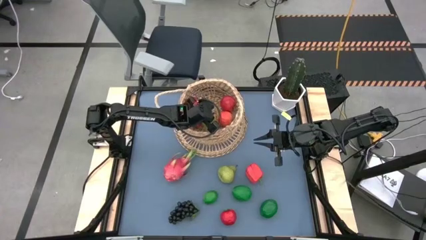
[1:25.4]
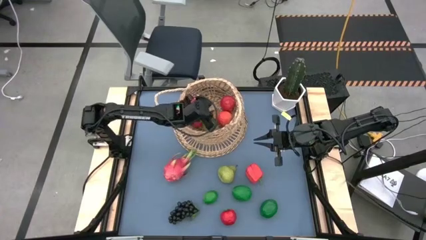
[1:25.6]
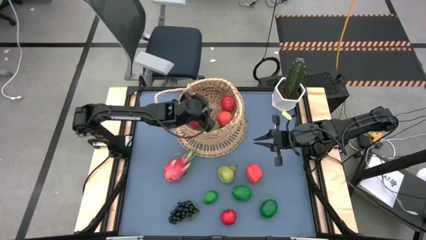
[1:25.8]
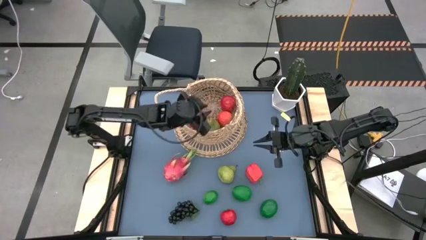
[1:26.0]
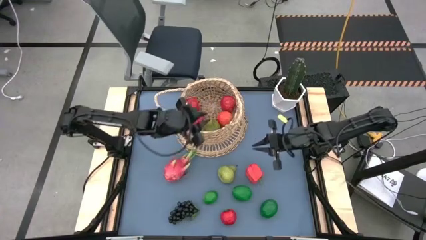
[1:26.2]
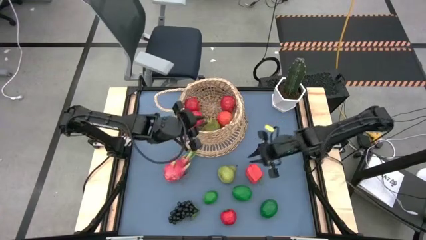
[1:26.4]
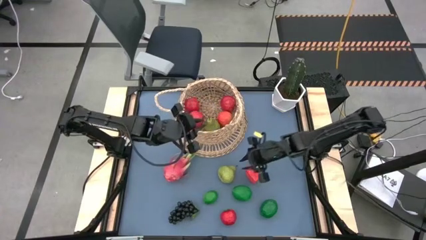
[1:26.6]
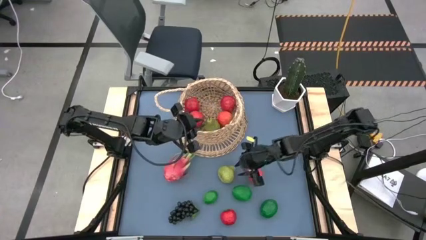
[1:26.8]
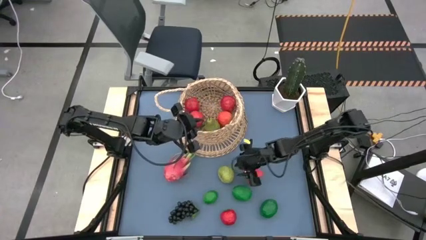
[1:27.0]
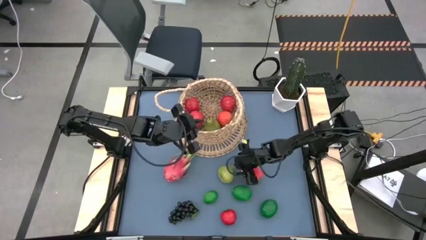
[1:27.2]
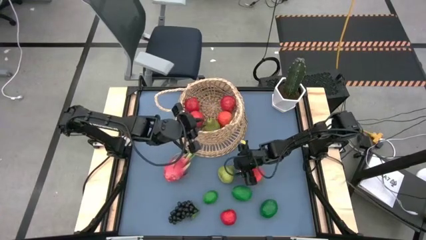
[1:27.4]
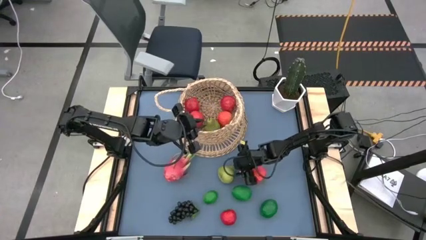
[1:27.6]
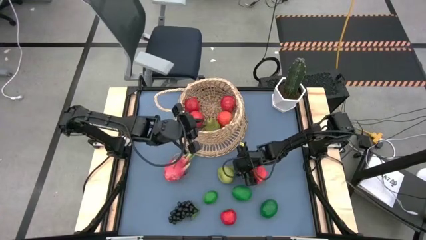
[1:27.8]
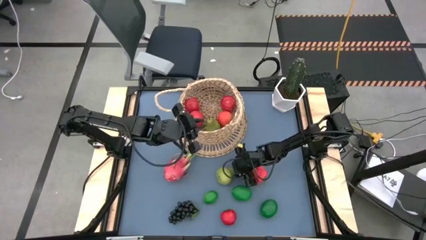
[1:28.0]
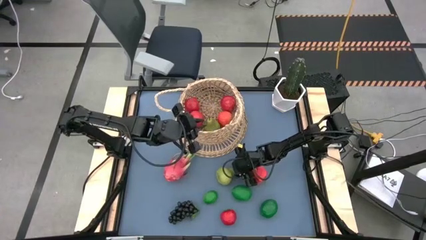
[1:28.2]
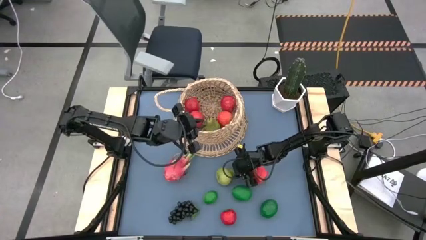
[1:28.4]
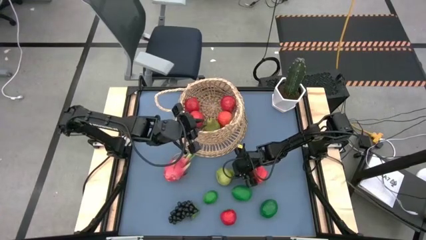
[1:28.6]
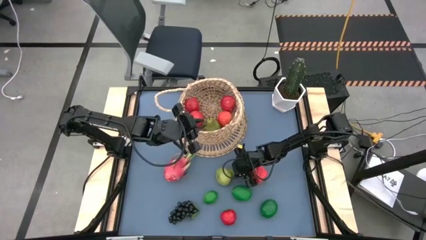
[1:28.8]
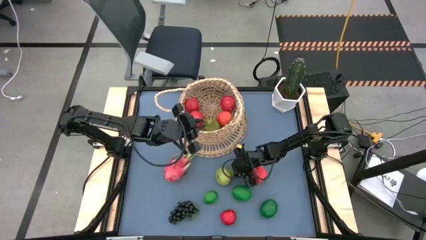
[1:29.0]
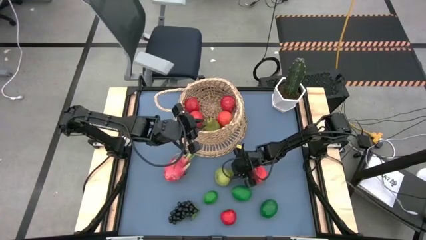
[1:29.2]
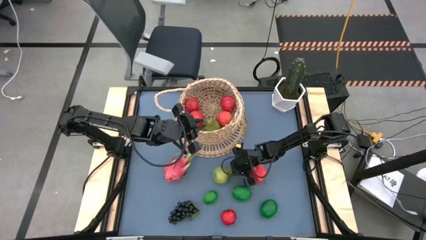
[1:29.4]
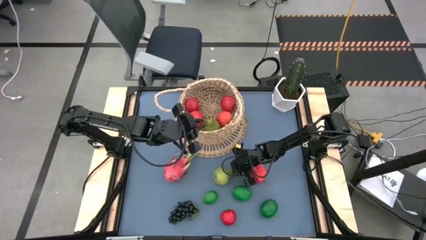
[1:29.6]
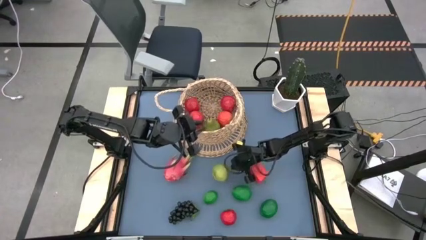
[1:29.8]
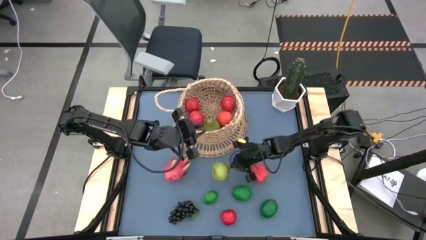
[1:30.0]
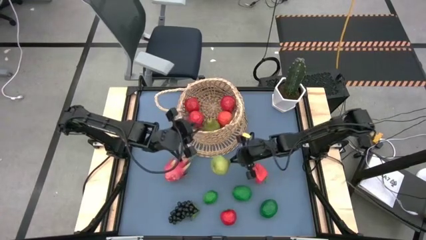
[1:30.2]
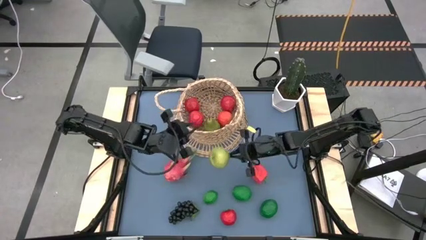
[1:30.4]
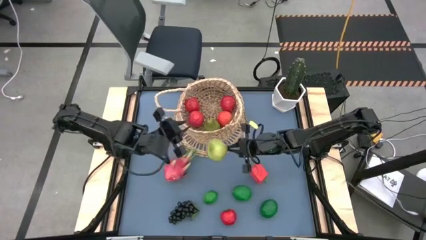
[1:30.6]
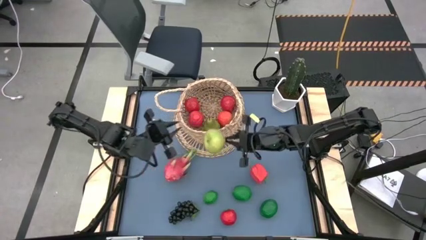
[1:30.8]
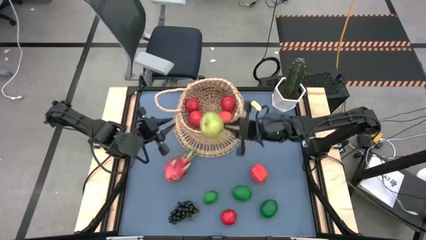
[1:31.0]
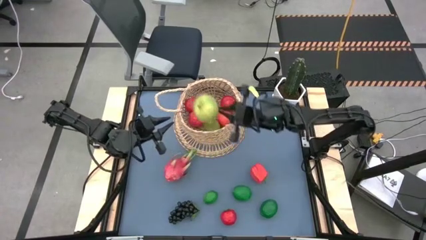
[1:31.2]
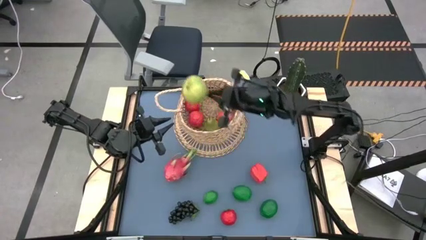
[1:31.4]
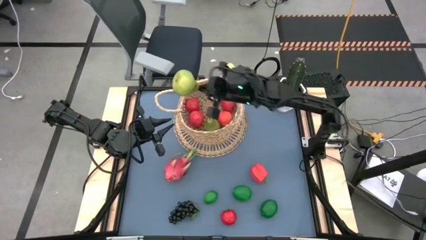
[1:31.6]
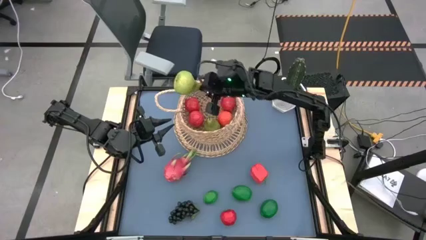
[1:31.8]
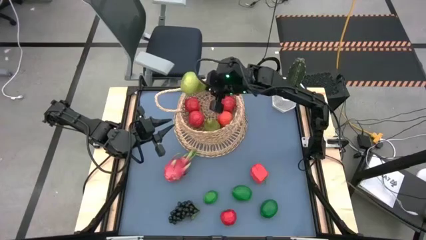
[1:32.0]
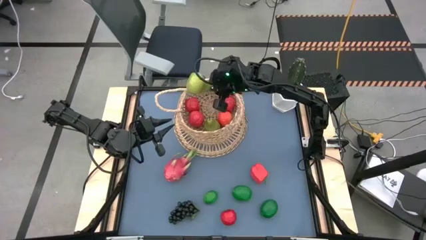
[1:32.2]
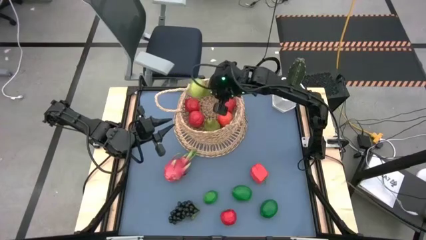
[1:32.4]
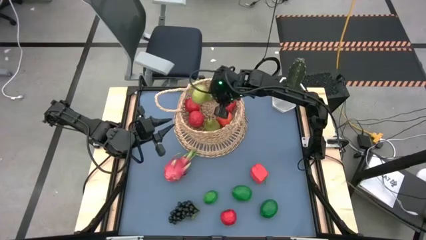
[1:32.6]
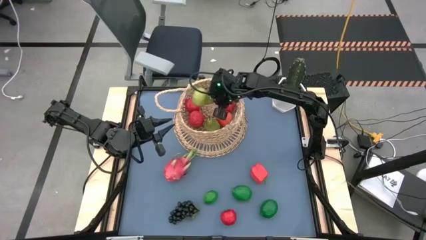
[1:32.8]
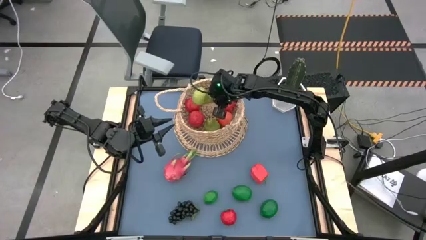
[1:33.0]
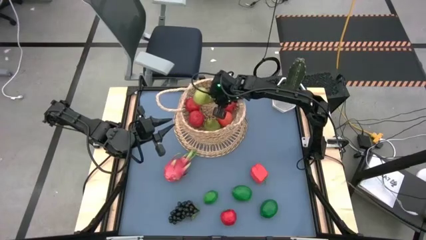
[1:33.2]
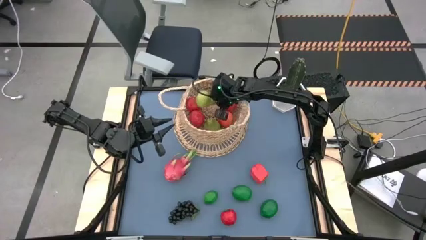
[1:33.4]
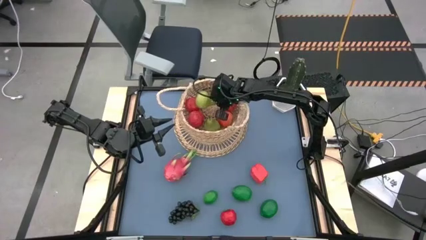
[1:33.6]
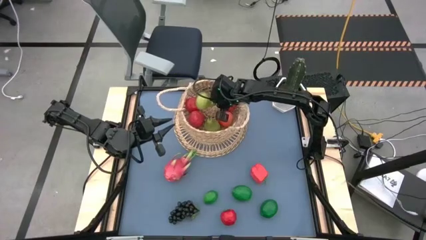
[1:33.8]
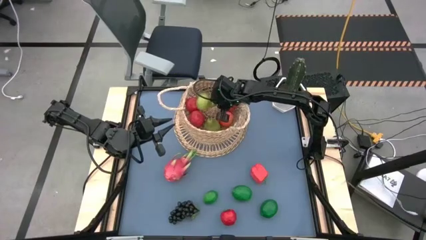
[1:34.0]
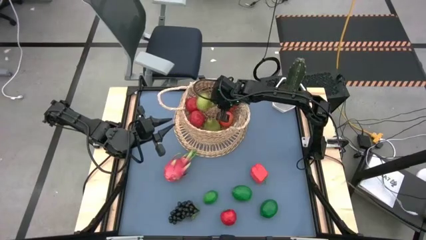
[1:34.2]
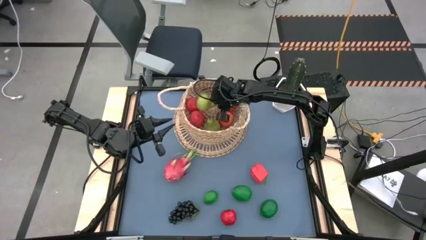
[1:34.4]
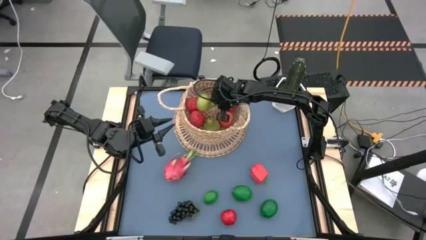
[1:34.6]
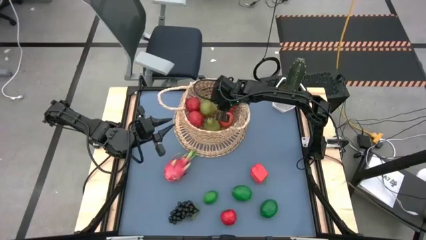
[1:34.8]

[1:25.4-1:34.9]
Task: Build produce basket
Put the pear into the basket

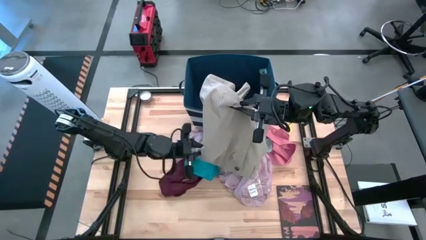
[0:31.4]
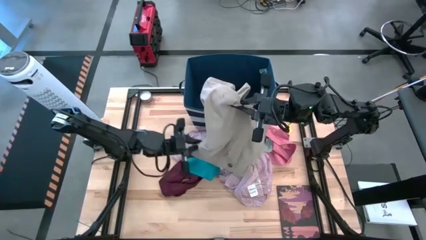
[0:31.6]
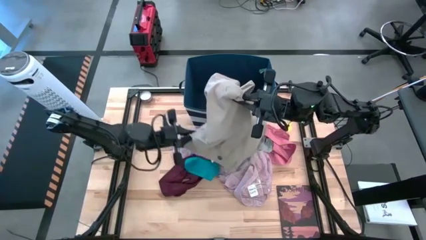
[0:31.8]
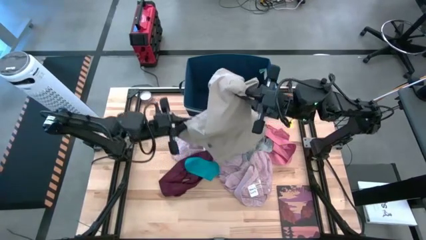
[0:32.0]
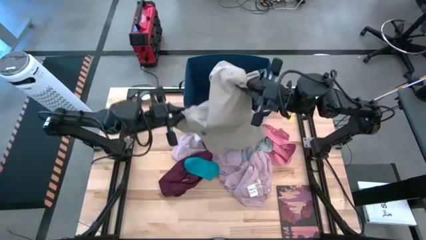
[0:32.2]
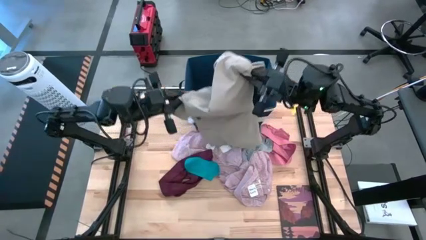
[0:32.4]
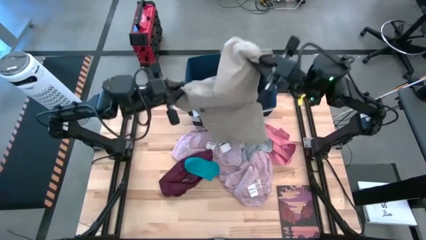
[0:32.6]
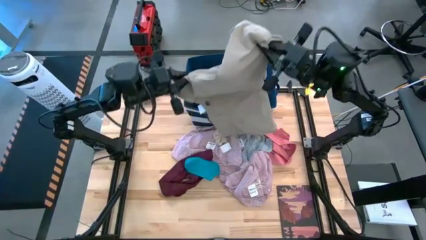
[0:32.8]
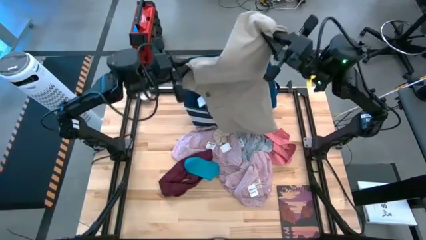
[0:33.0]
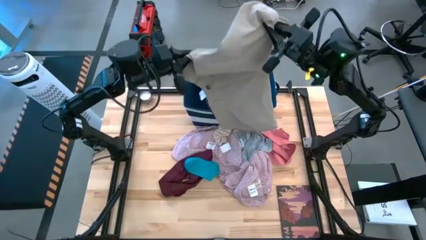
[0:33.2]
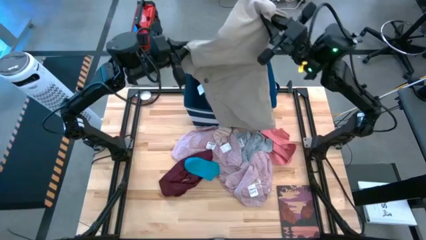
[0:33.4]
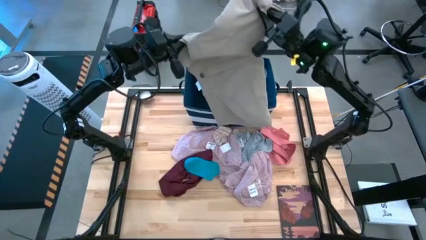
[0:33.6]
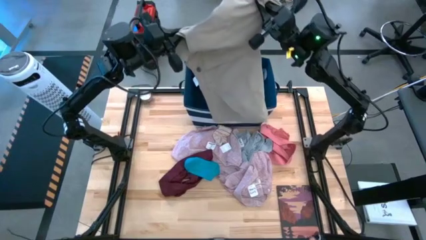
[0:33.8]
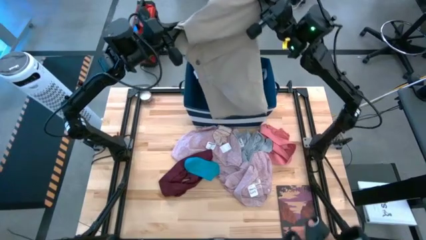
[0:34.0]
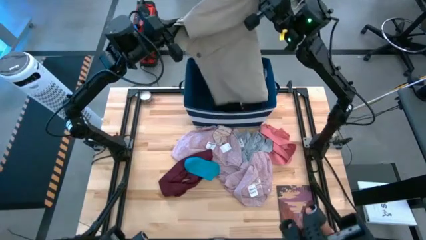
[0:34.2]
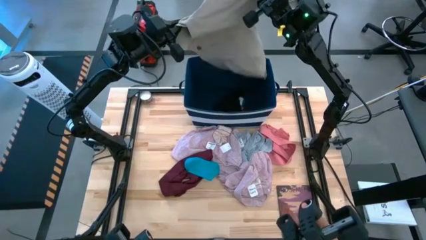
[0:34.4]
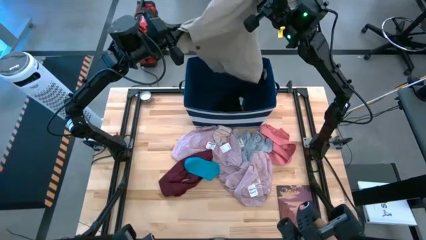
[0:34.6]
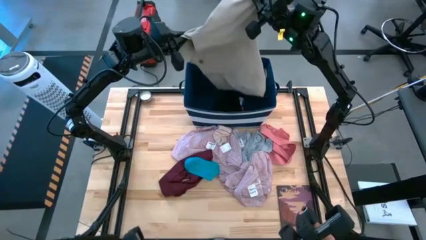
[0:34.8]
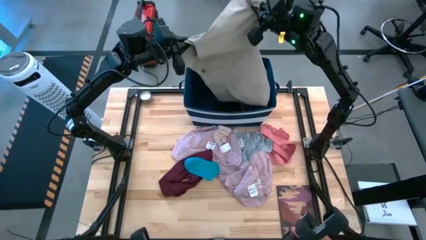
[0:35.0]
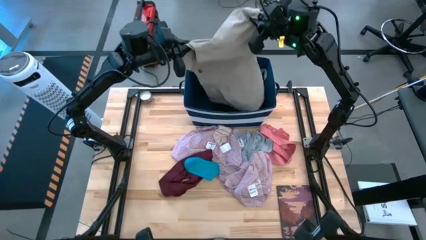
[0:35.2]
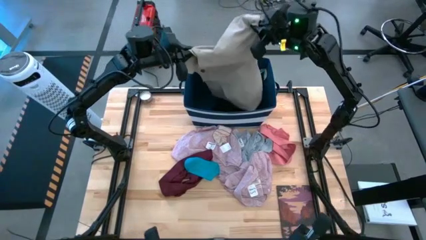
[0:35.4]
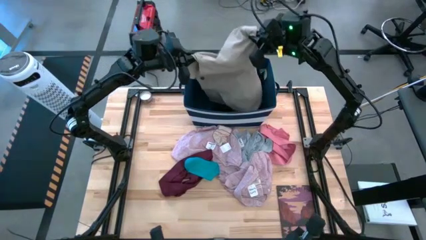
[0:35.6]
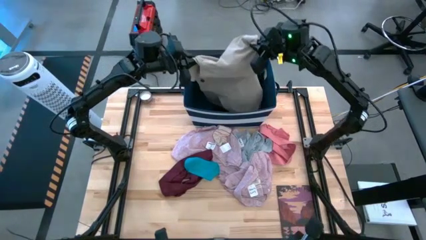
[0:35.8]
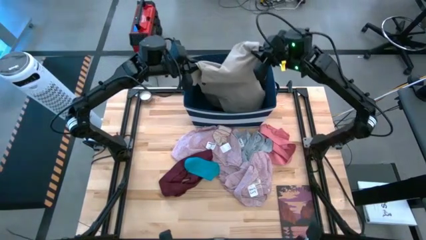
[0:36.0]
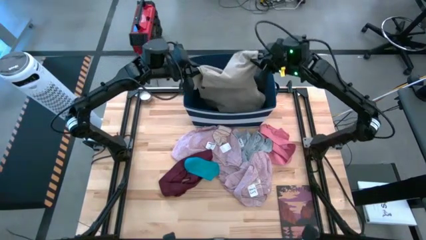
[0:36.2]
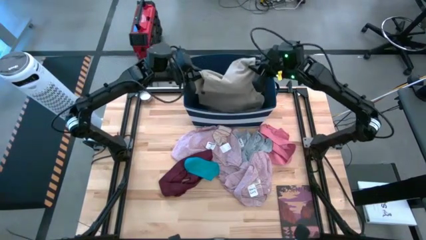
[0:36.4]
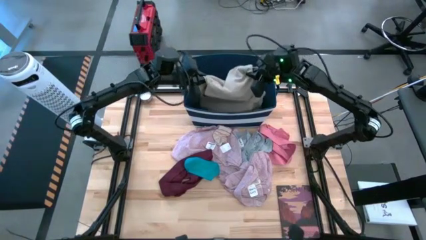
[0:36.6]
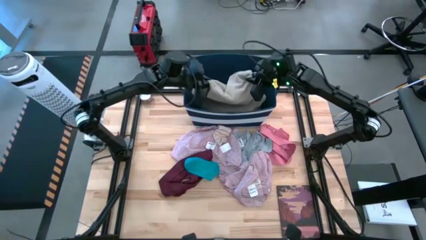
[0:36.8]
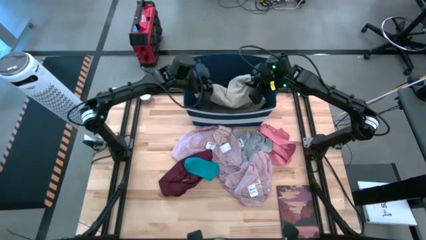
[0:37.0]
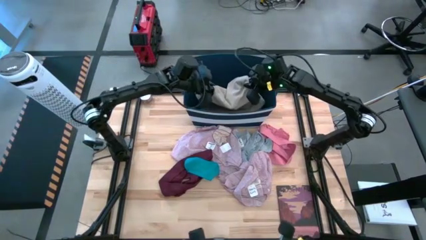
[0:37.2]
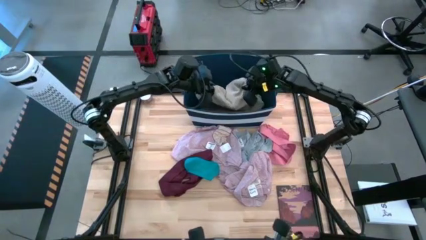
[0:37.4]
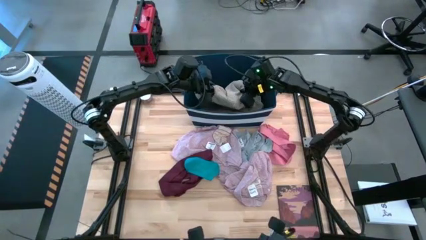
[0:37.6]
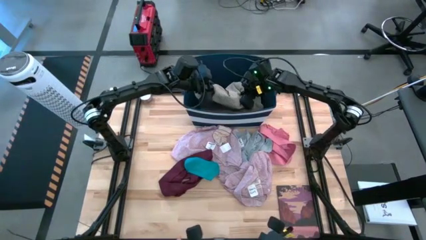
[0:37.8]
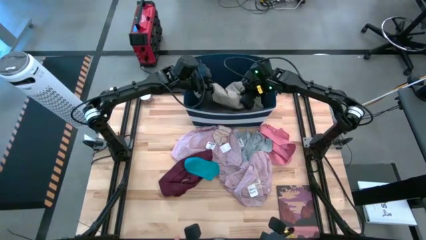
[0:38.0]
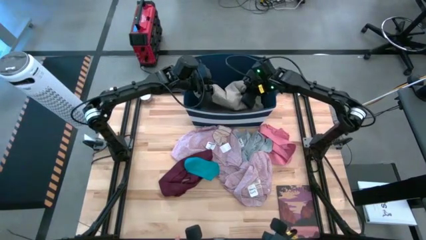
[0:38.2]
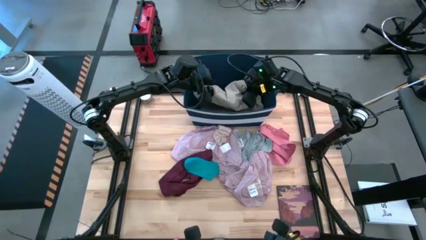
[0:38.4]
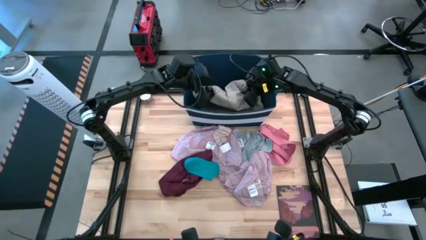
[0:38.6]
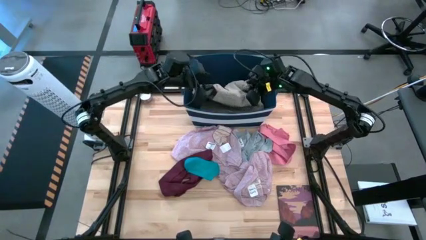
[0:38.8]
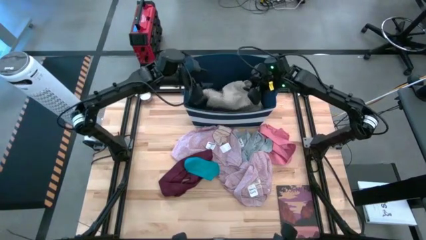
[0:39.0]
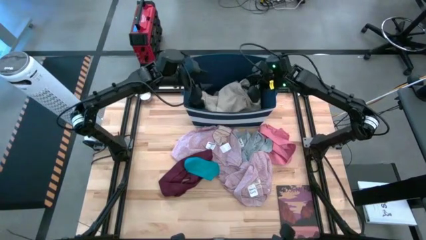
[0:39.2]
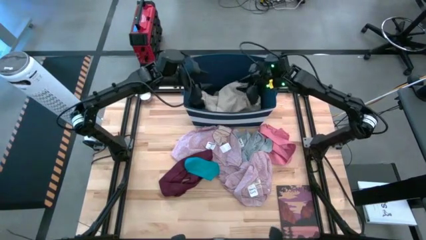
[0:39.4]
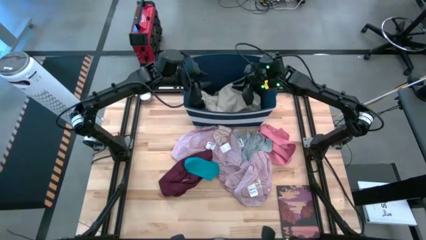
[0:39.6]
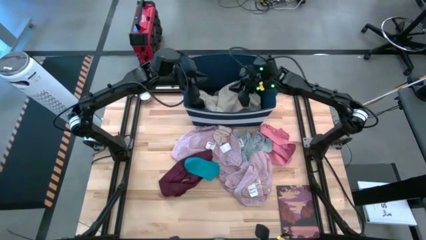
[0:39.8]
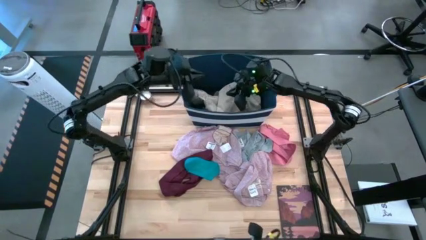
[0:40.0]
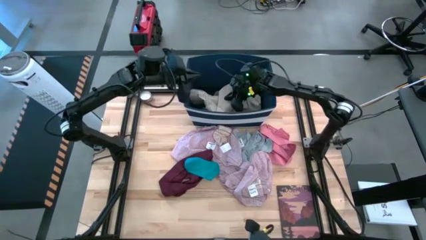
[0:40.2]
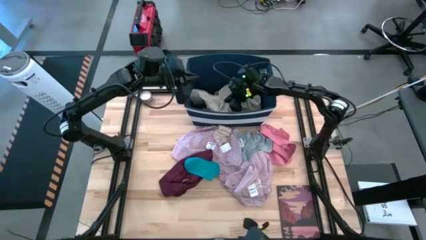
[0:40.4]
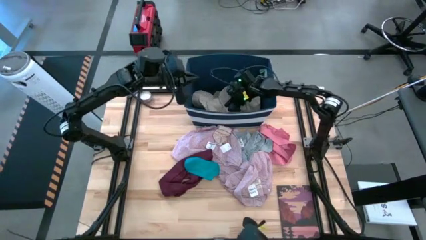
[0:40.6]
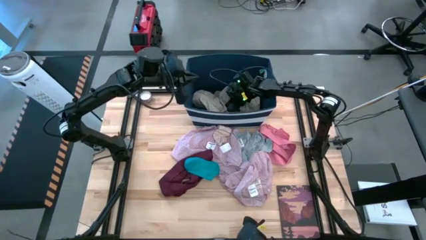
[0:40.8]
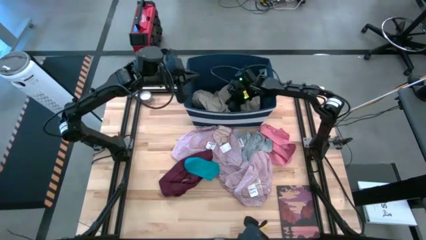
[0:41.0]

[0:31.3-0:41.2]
Task: Sort clothes
Put the brown shorts into the blue laundry organizer
